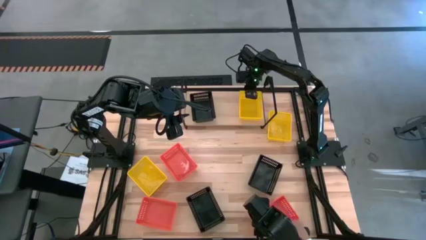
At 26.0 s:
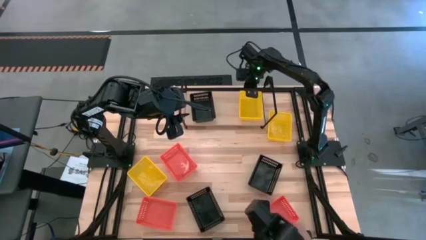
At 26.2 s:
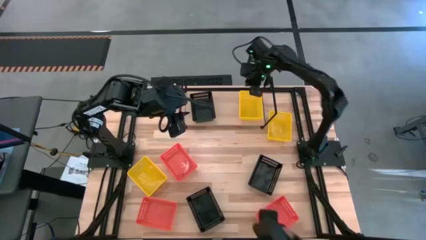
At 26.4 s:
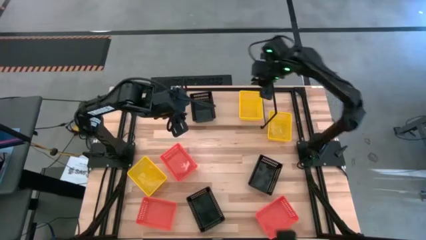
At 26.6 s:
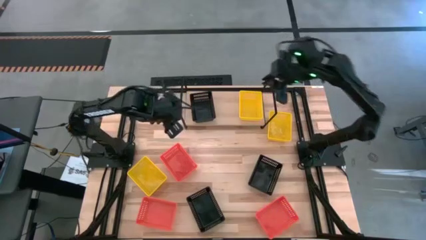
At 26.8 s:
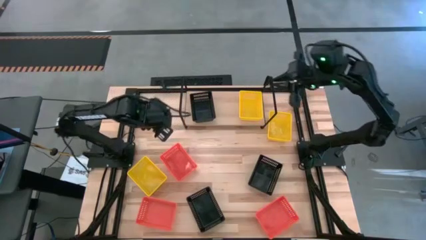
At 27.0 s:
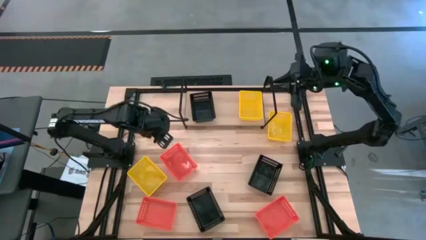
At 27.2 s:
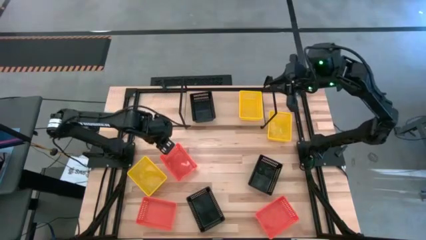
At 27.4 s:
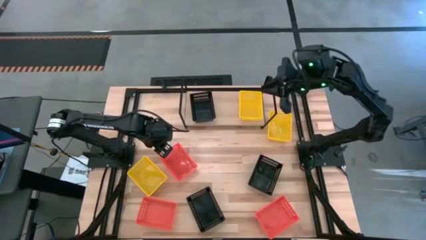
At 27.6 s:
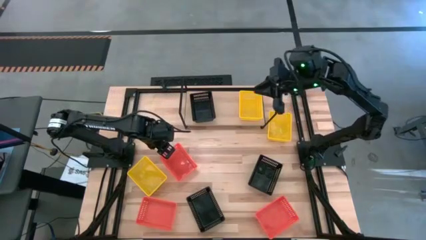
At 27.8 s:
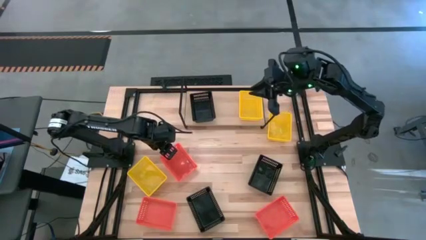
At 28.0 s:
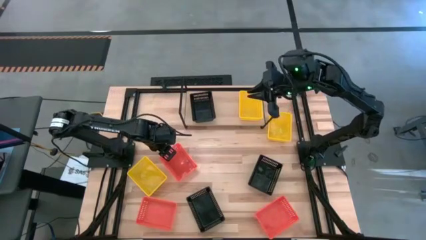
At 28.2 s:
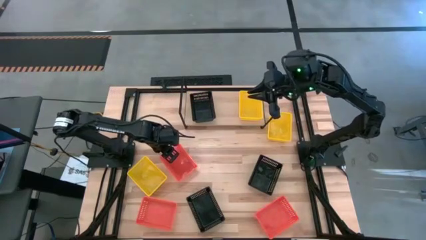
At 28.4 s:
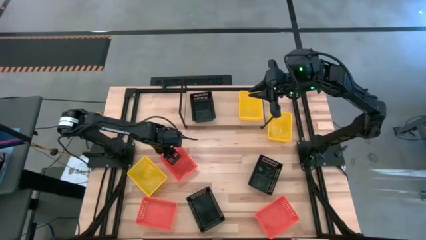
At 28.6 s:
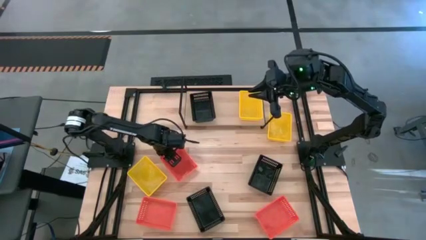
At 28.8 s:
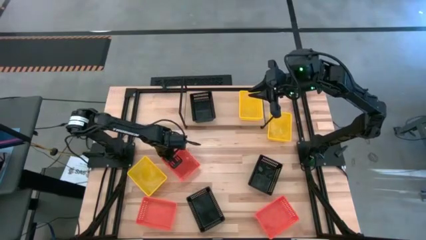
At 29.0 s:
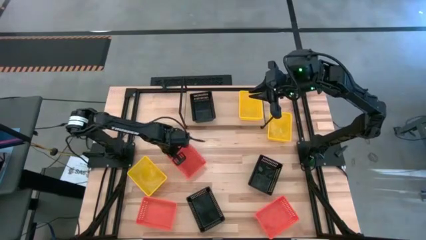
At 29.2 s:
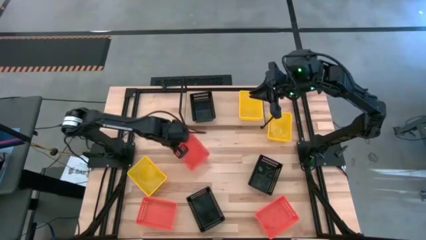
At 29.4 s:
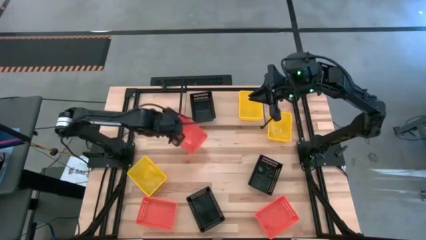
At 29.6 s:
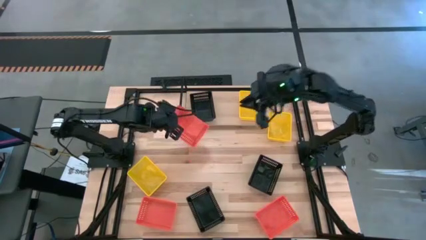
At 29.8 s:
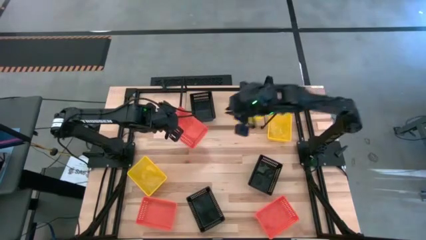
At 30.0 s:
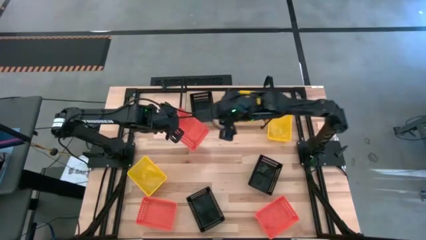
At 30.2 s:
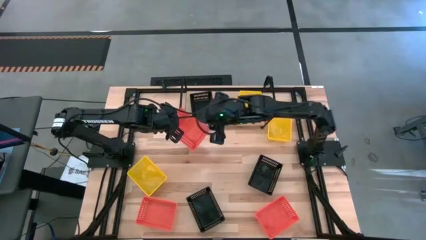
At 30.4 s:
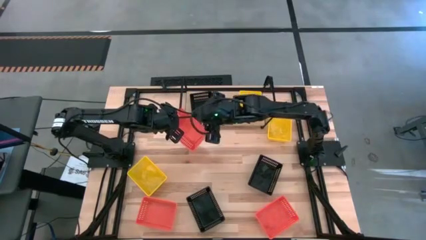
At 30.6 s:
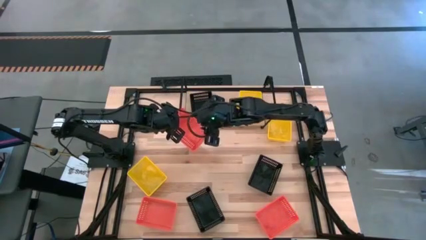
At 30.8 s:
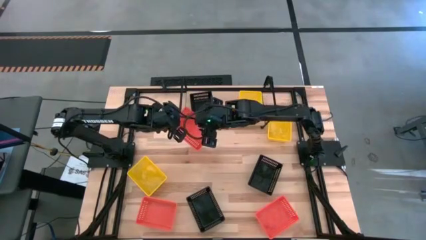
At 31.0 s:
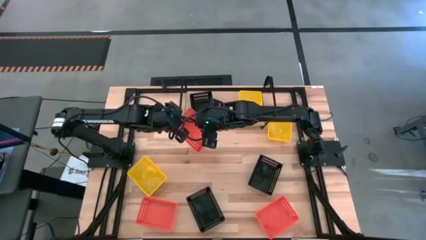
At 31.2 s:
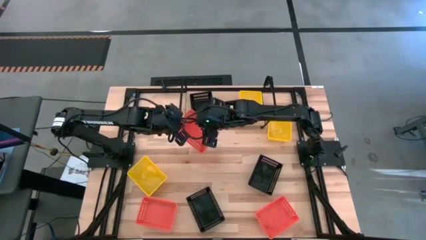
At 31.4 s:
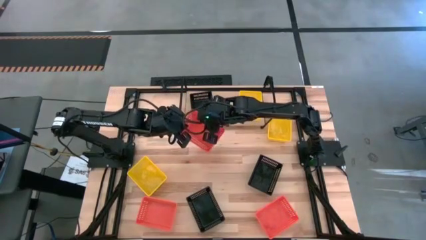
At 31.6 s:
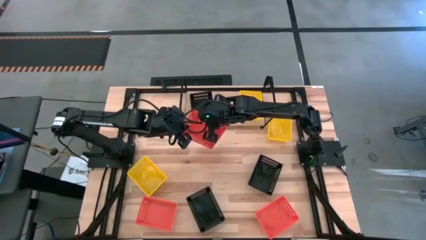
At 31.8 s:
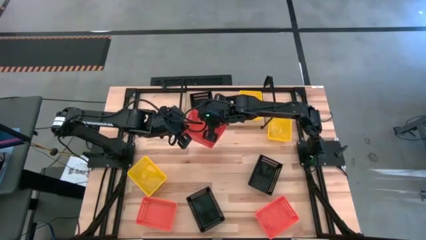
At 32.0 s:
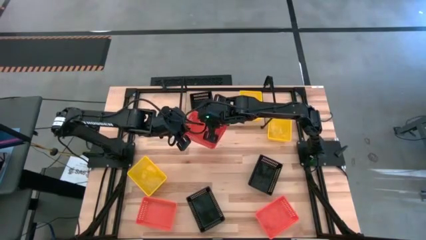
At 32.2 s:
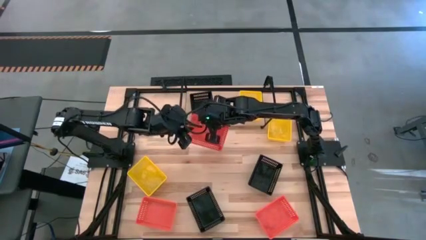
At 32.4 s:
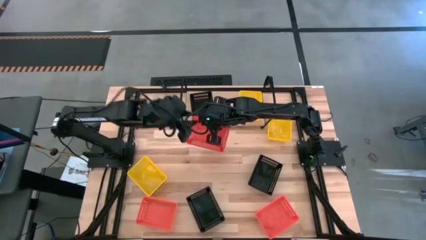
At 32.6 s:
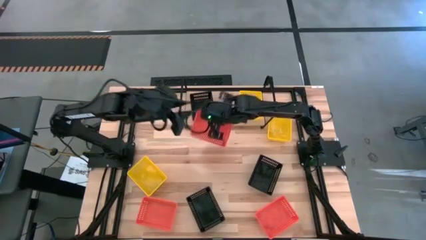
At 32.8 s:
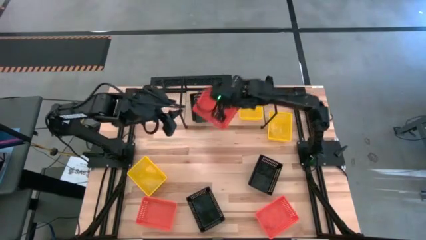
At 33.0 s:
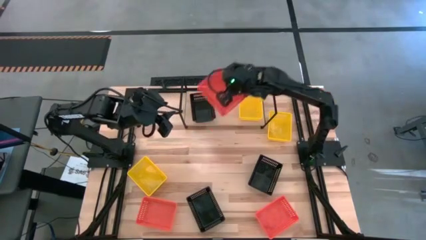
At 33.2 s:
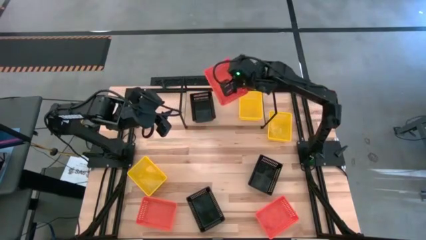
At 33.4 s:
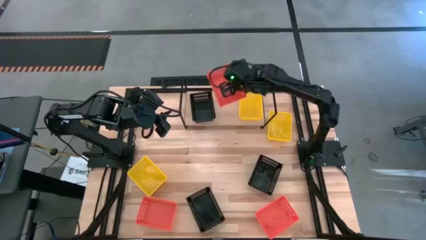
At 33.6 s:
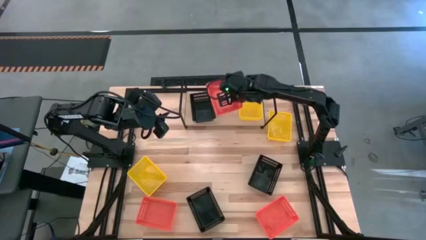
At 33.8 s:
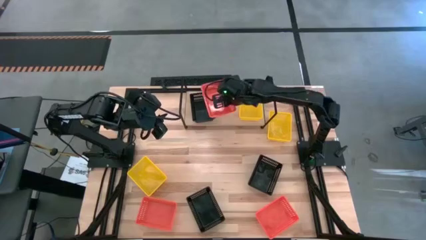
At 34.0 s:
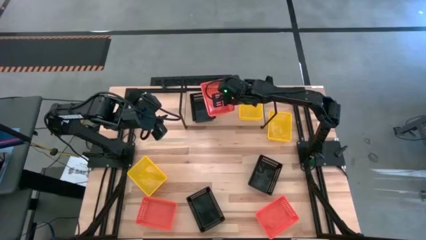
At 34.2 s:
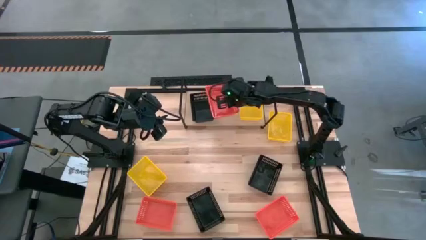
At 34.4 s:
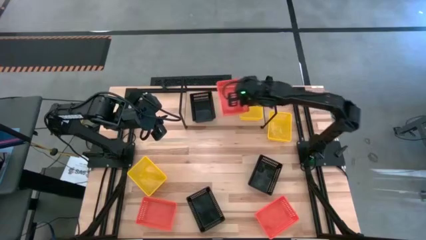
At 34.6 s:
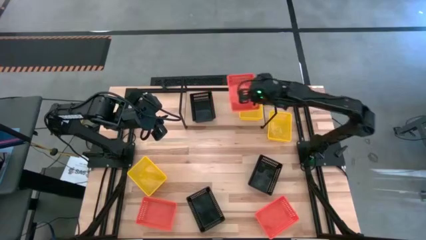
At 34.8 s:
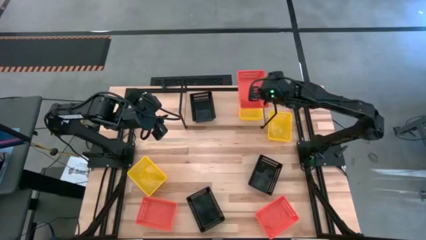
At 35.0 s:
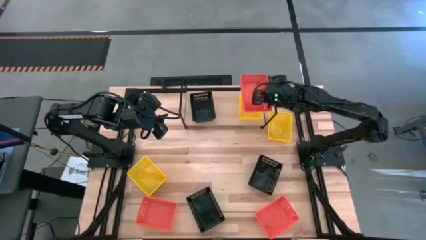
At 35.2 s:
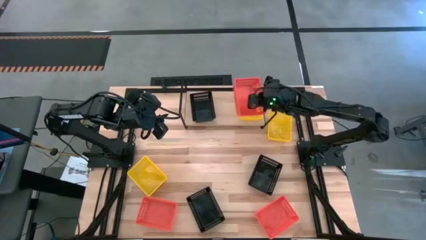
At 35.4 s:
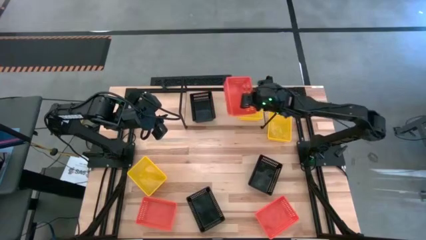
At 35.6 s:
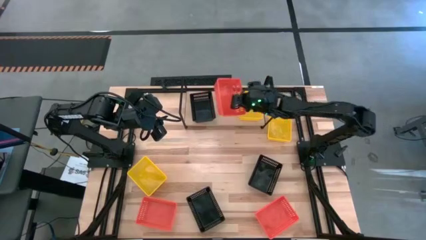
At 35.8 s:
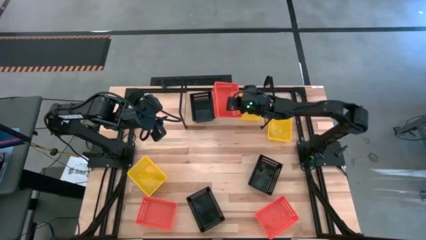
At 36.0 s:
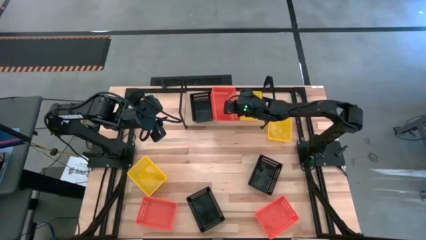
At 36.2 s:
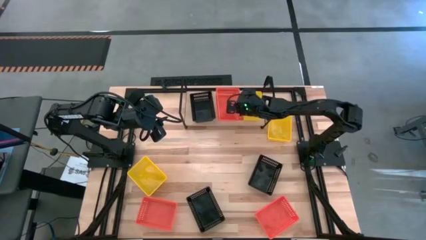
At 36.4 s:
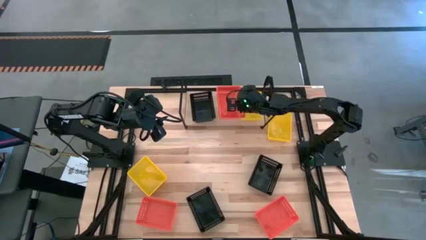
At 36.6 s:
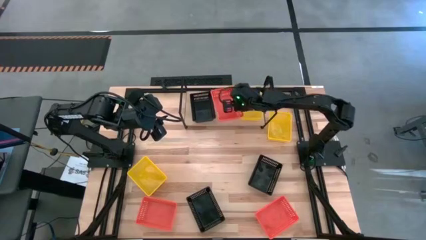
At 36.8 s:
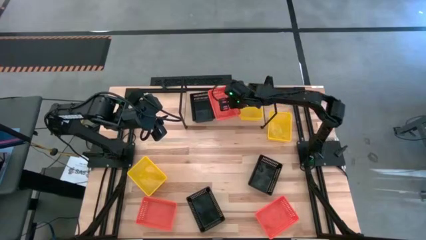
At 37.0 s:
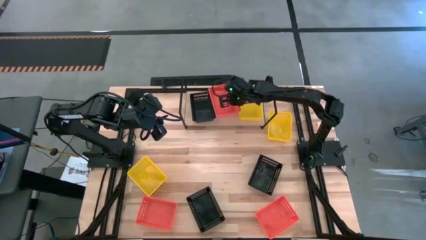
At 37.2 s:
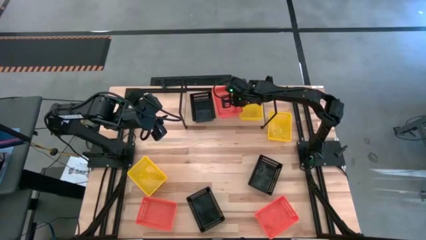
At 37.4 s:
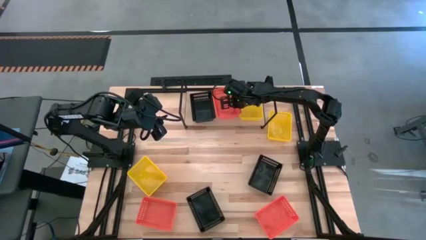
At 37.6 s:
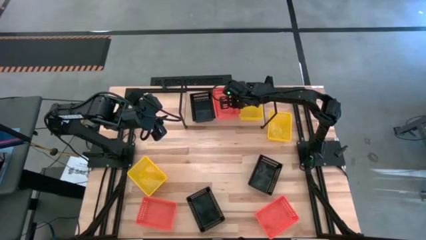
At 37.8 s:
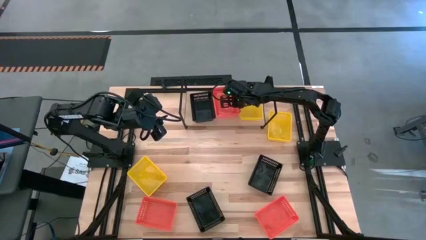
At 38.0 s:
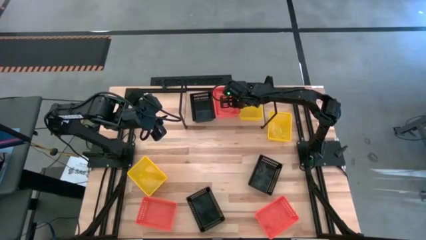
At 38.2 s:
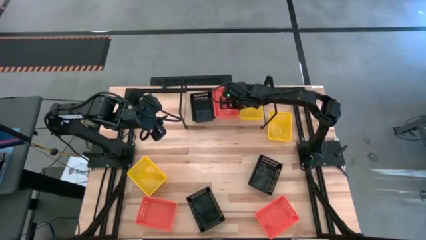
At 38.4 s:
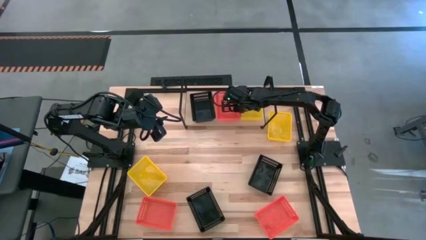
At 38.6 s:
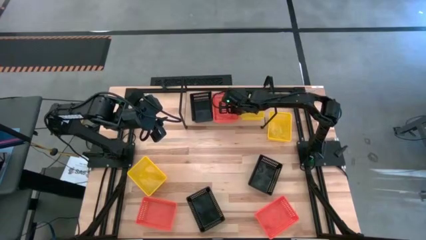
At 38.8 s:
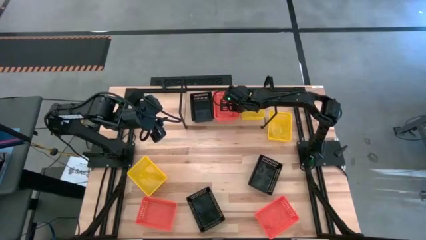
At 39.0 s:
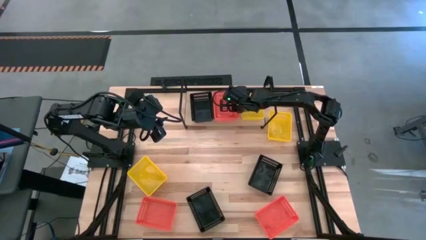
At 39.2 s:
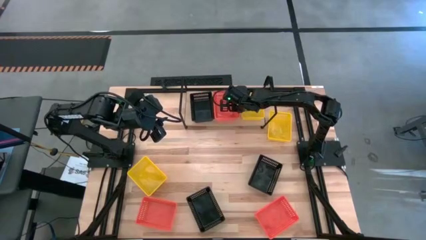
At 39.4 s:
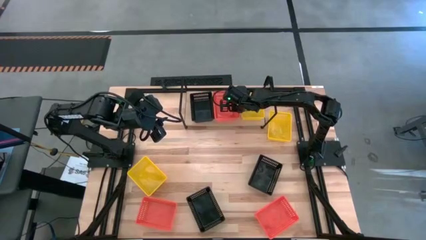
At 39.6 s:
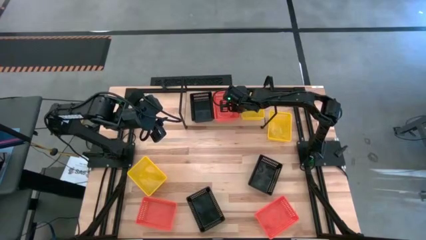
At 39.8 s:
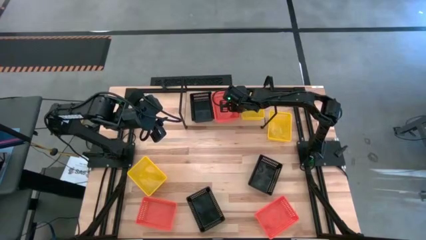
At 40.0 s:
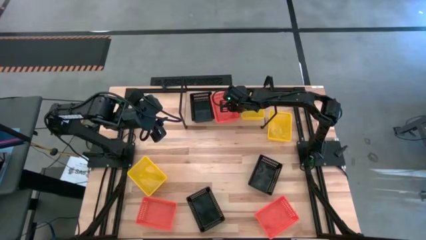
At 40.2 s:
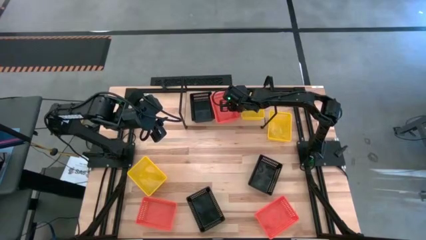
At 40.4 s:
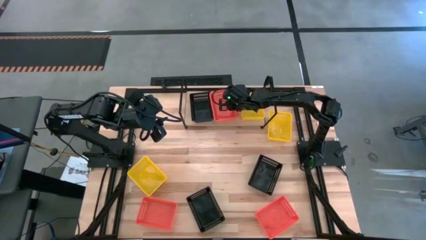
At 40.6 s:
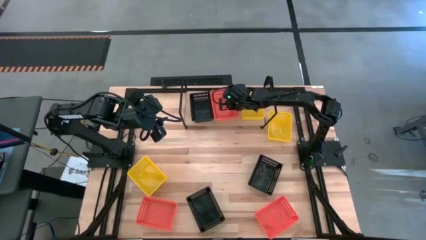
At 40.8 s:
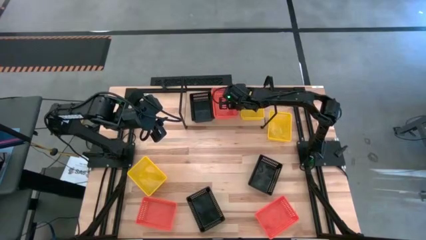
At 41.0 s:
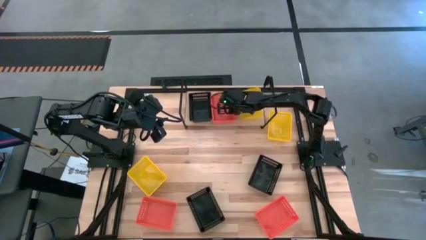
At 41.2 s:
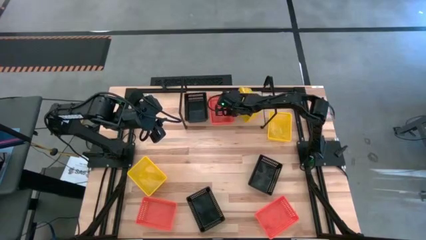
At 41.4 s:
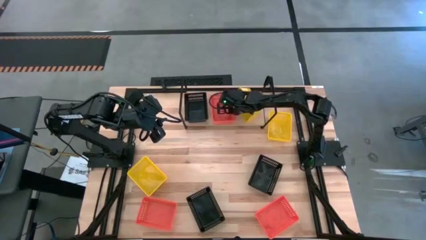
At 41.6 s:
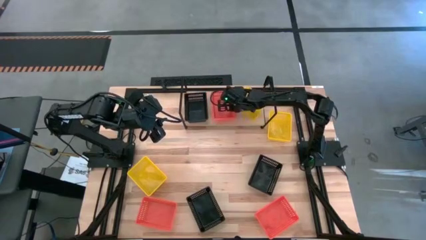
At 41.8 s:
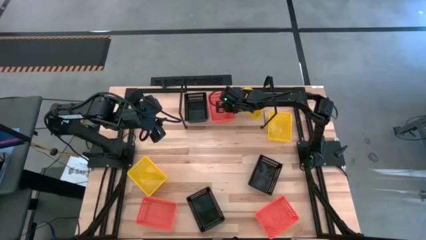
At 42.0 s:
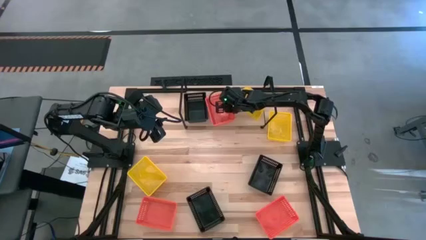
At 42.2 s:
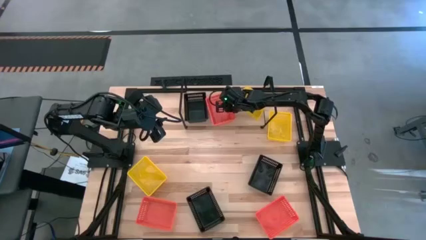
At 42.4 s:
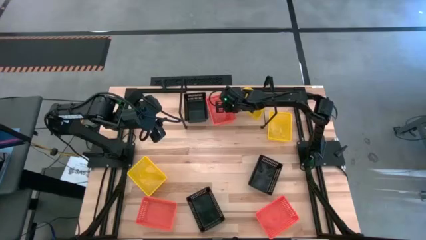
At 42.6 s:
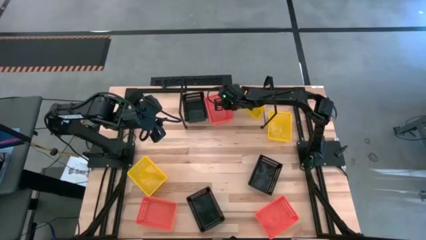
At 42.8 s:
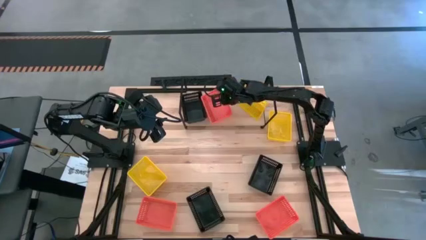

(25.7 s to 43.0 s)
Task: Stack baskets on shelf by color
Put the top orange bin on the shelf
